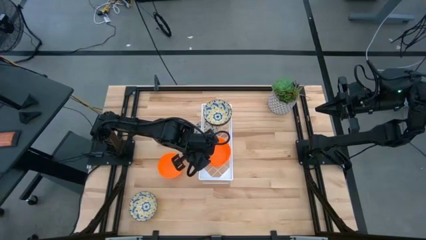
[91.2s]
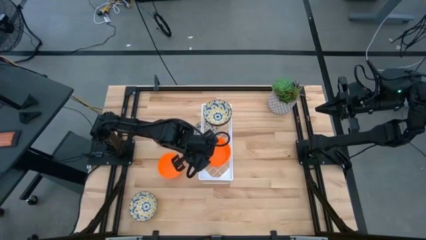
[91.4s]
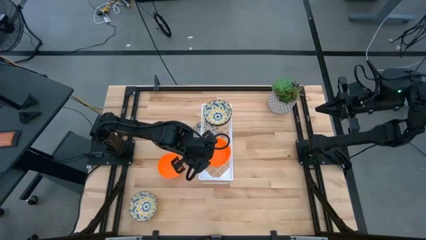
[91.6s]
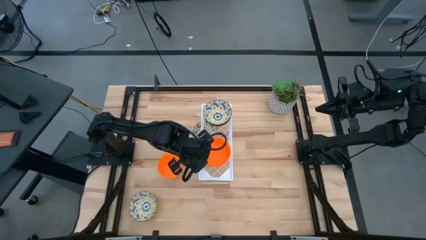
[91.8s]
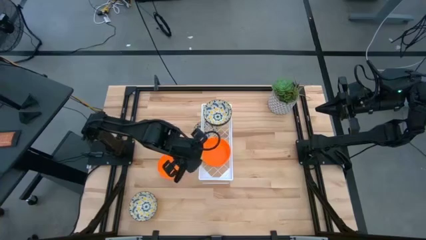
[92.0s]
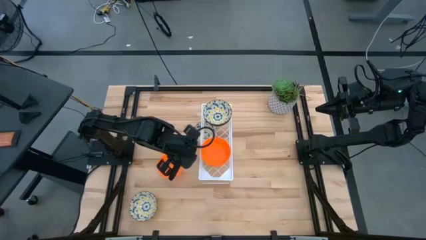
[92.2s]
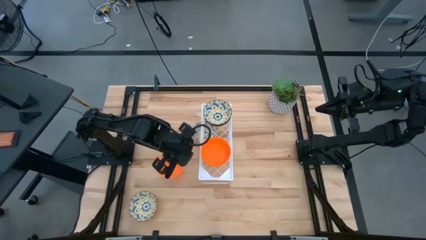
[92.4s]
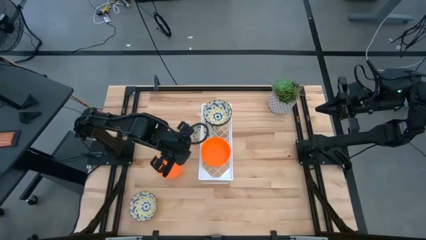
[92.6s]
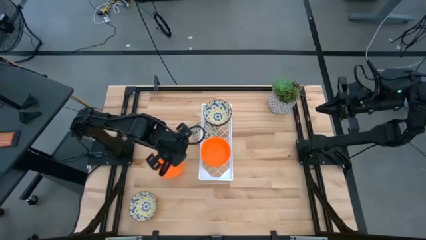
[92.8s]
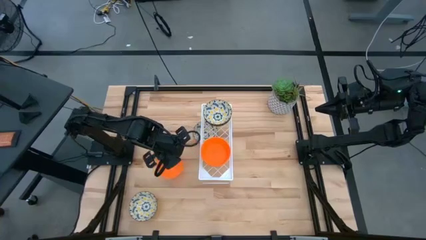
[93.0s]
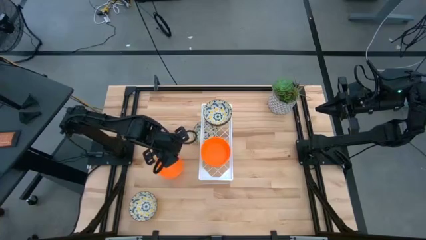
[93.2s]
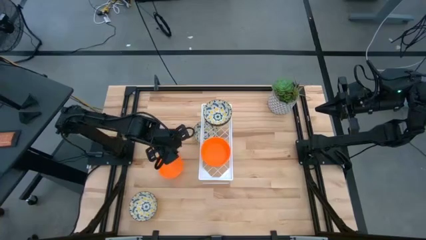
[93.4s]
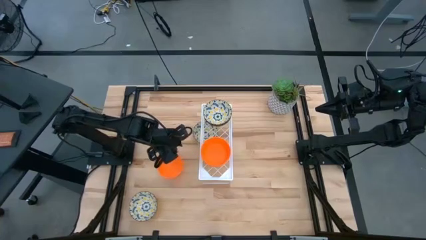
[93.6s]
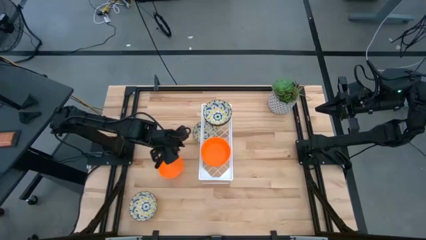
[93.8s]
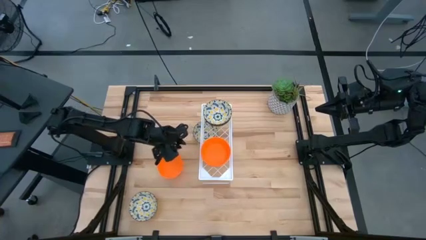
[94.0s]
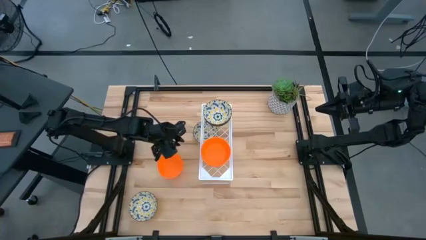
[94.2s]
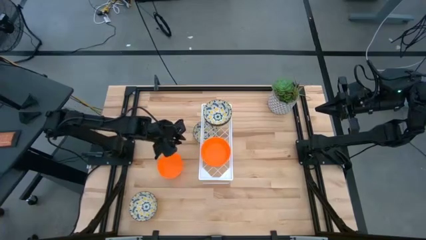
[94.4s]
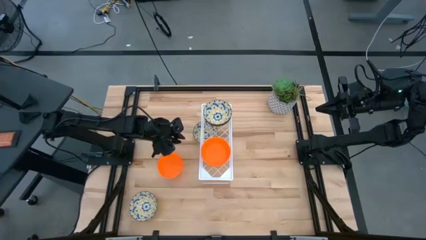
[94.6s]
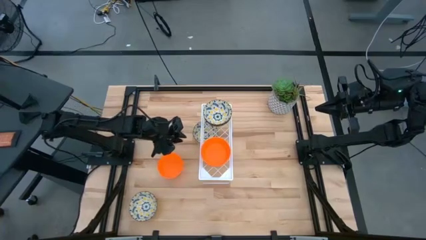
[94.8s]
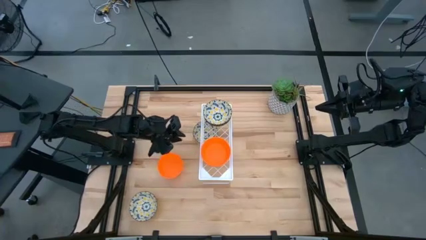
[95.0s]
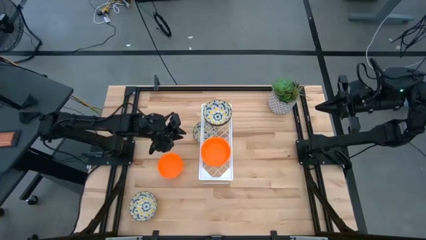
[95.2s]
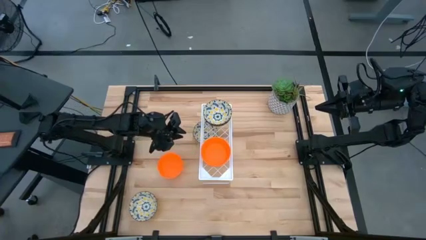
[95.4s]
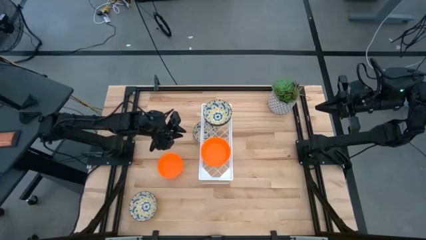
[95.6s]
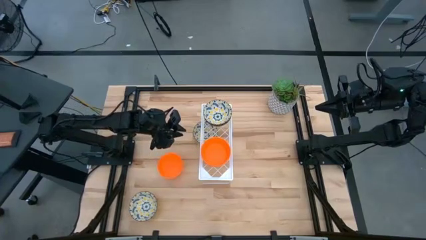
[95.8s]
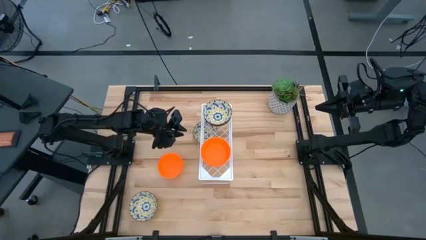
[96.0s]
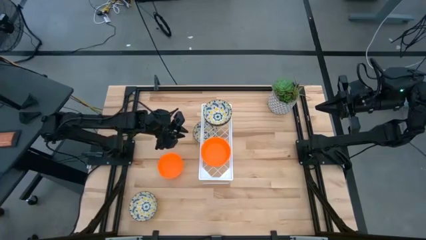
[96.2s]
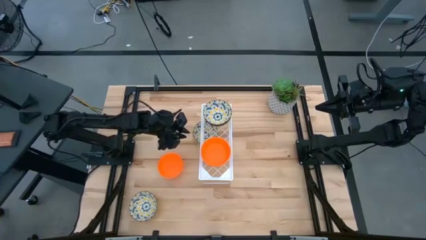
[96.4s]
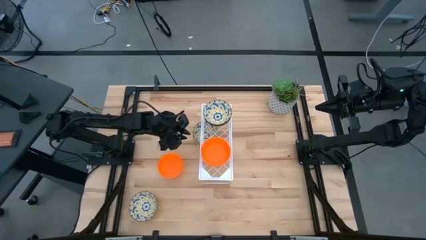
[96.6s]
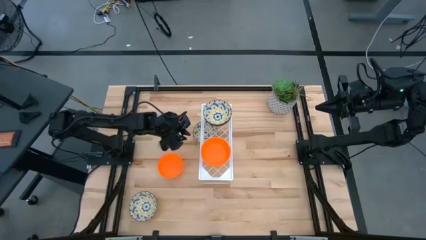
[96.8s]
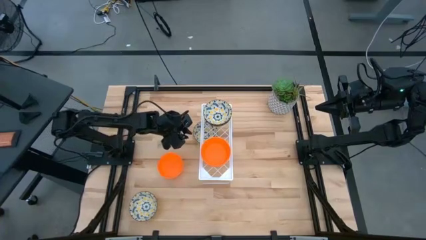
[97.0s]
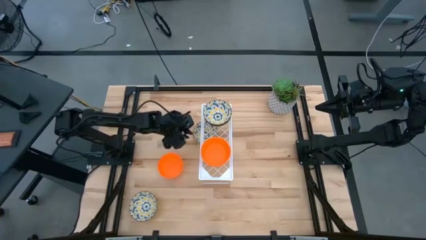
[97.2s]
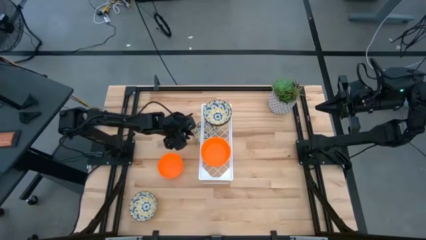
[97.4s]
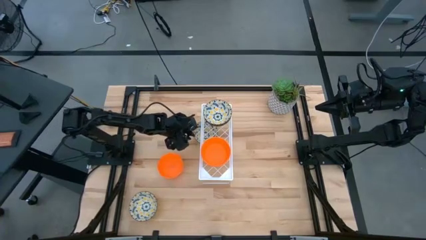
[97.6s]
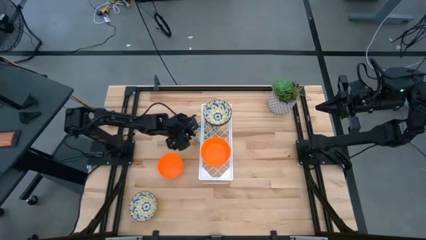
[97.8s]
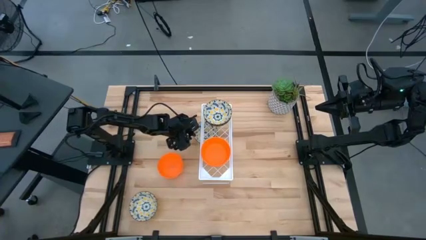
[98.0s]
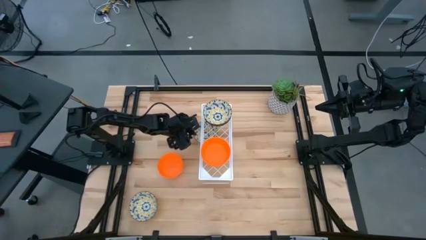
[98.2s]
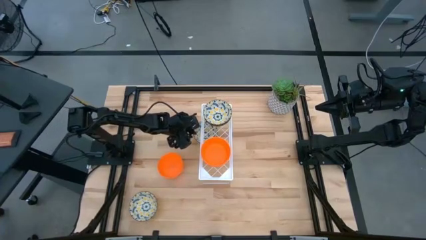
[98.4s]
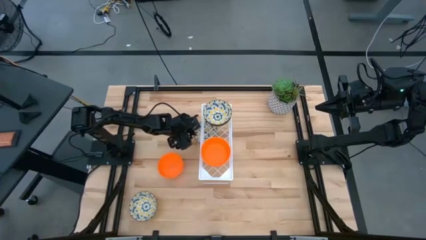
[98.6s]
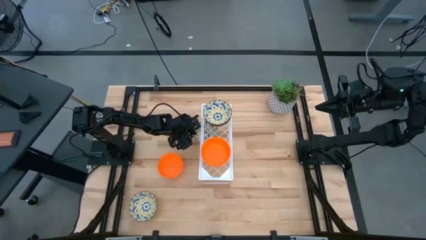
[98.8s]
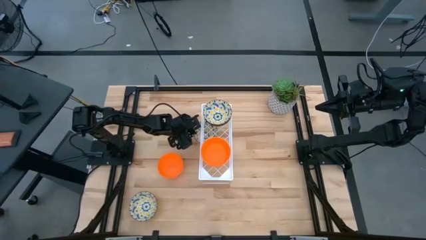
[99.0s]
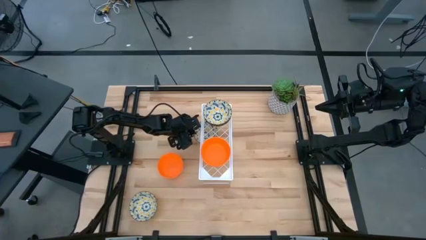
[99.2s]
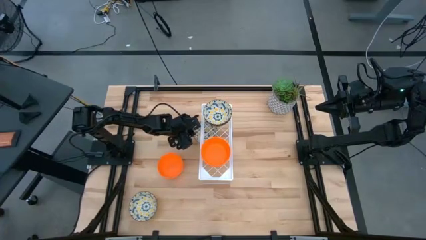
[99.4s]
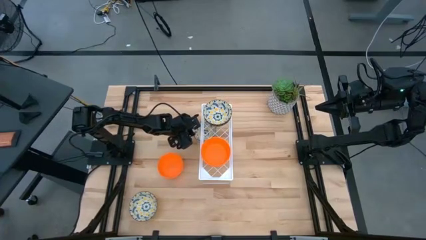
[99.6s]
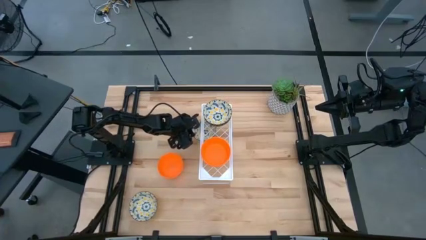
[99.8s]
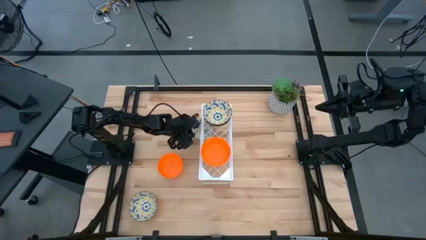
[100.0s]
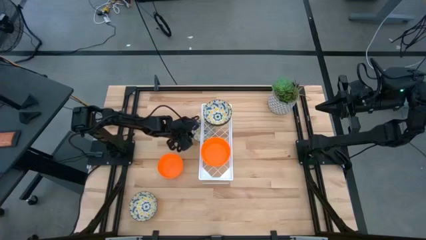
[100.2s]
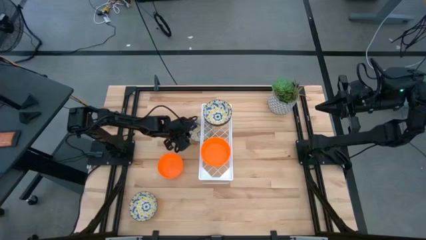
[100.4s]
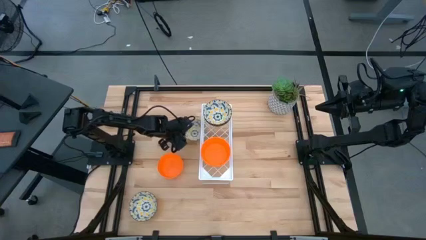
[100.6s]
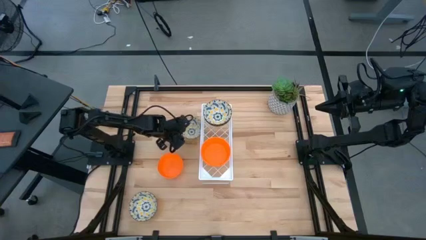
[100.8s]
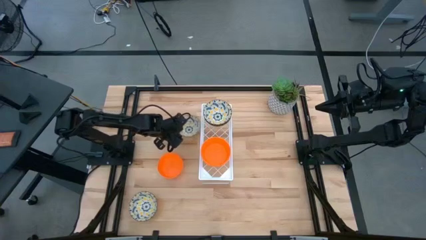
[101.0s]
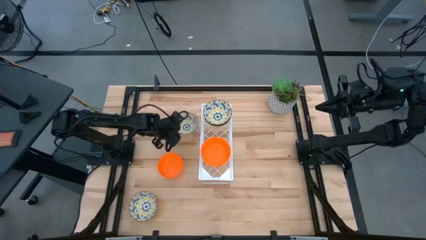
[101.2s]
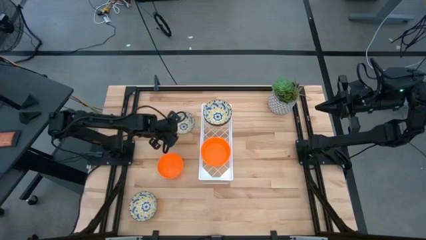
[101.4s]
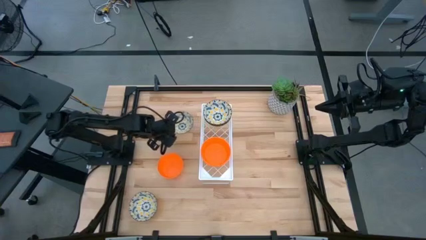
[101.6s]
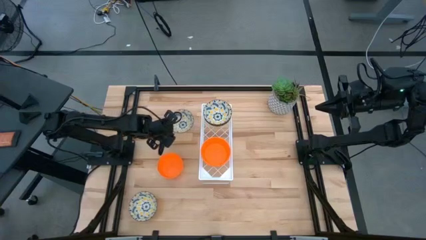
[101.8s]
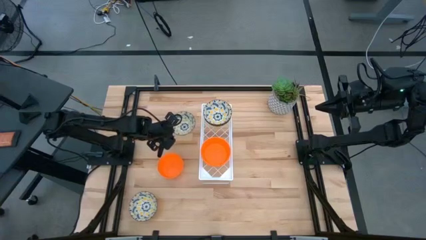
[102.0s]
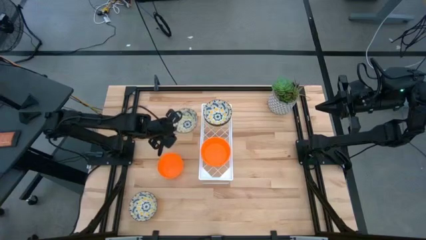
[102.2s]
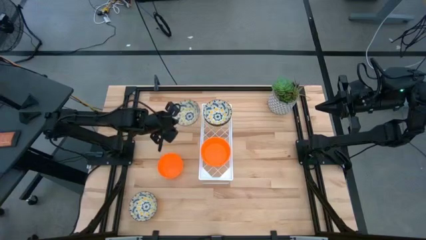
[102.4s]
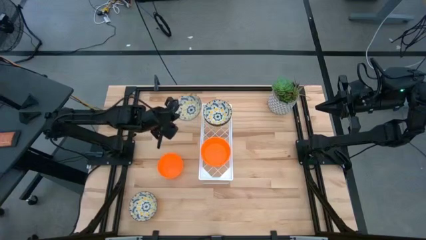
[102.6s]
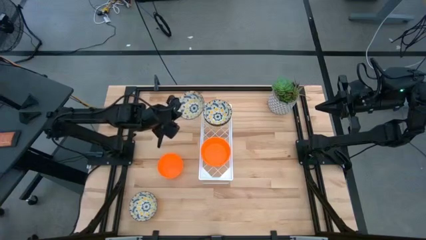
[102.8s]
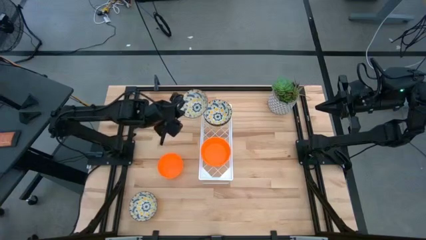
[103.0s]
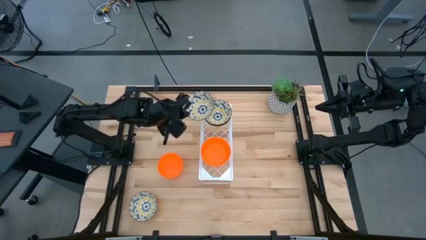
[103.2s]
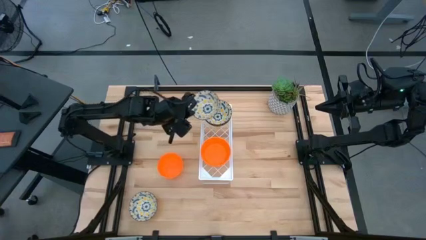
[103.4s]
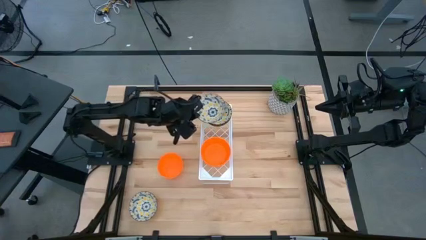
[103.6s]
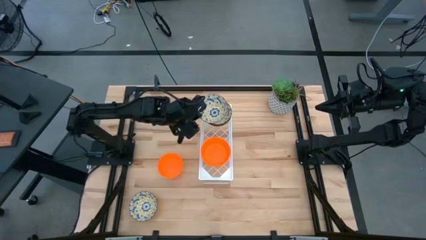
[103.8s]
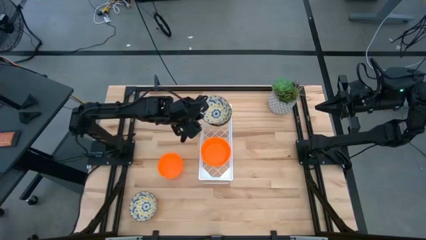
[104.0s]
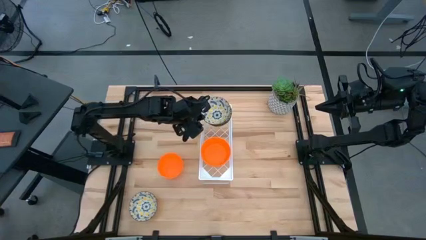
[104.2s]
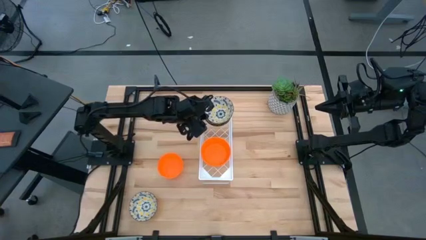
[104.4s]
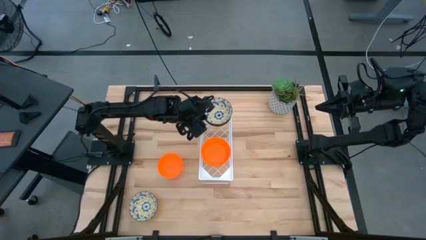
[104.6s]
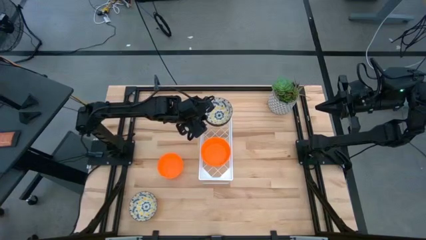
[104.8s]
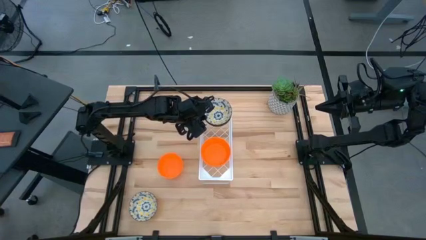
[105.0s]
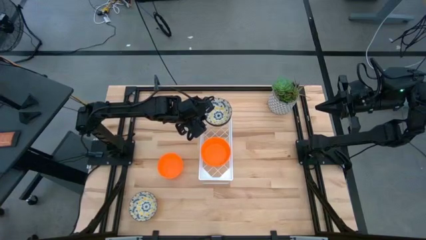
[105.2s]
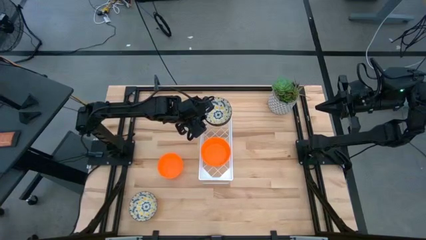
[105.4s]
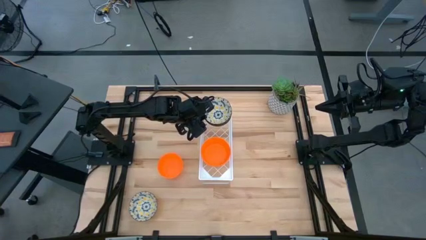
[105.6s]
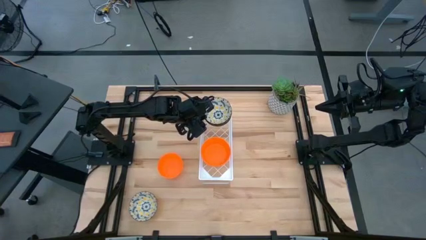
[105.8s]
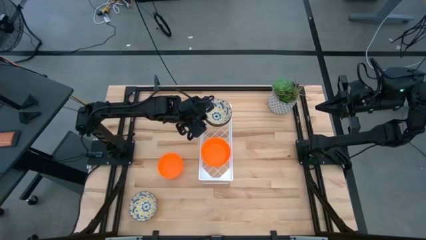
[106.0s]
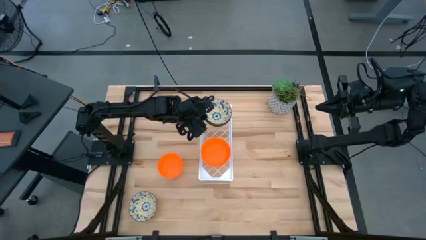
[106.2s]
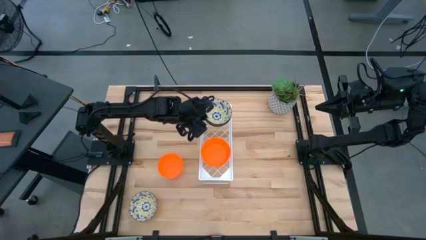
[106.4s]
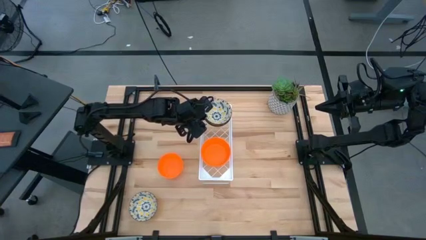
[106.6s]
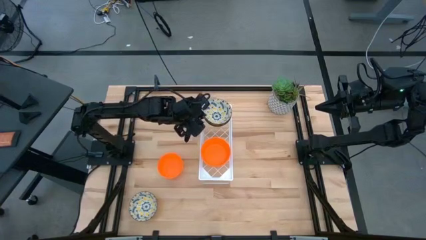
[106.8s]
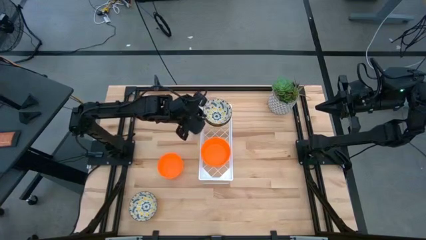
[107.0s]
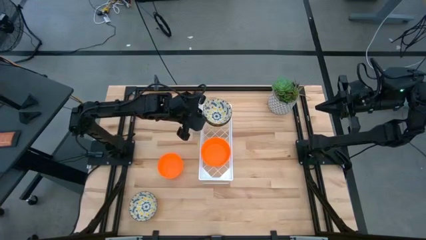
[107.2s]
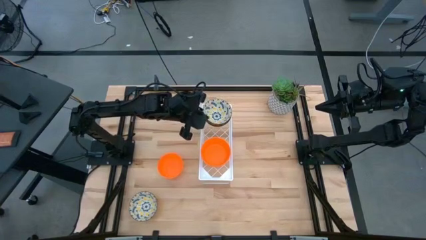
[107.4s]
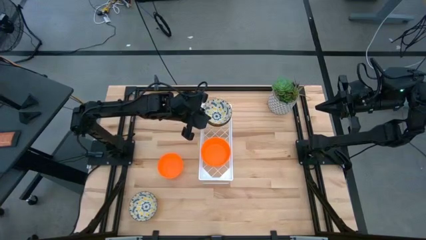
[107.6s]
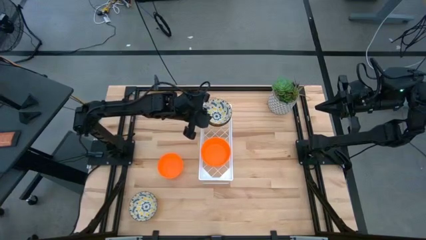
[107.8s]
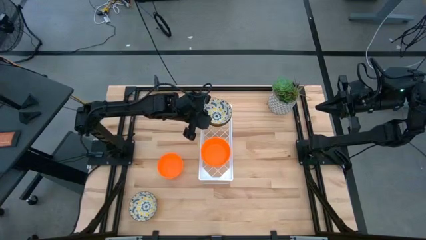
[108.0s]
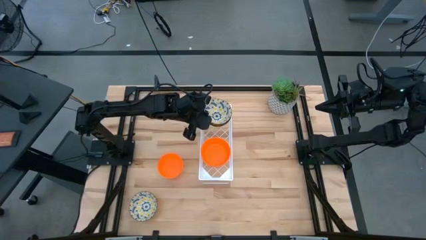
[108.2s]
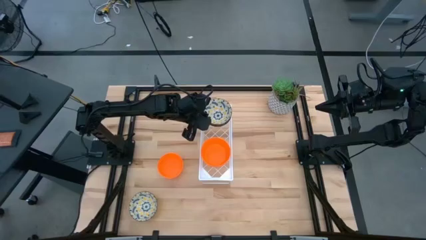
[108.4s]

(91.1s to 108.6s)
Task: Pick & Place Mini bowls
Stack the yellow patterned bowl on top of the yellow patterned bowls on the shelf
